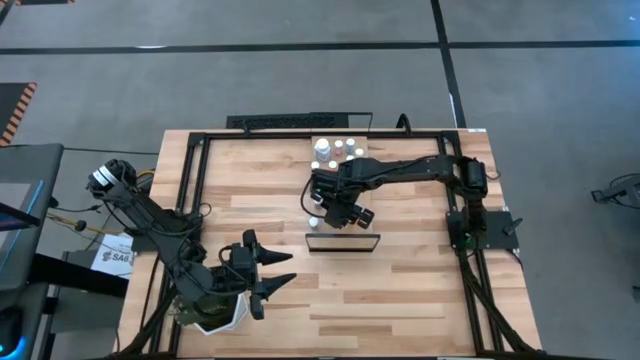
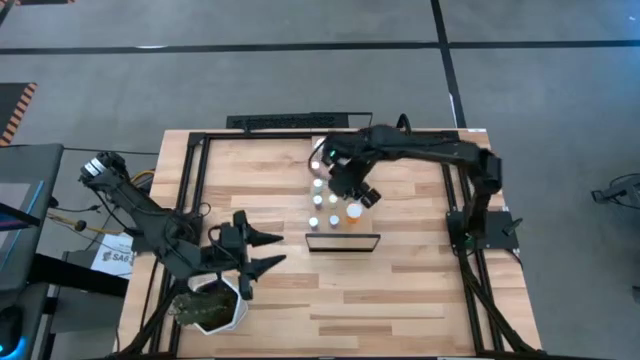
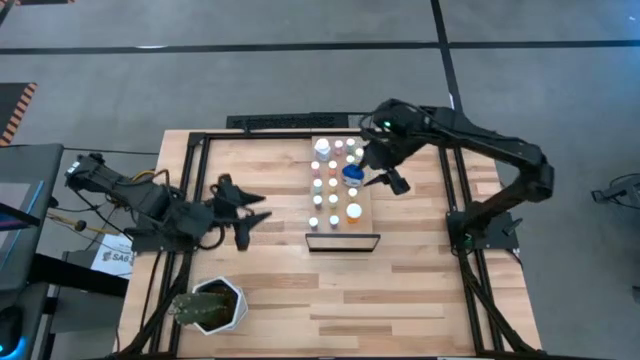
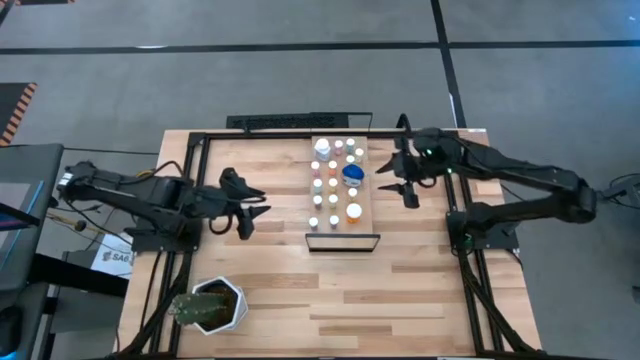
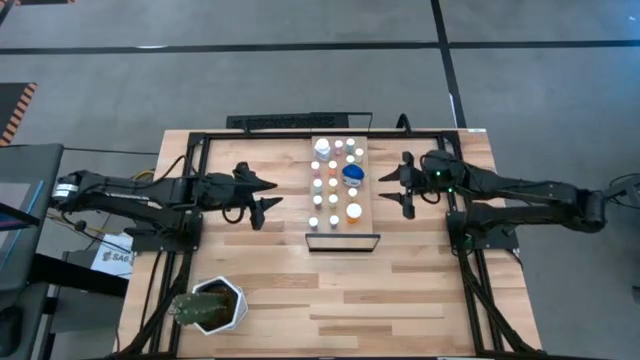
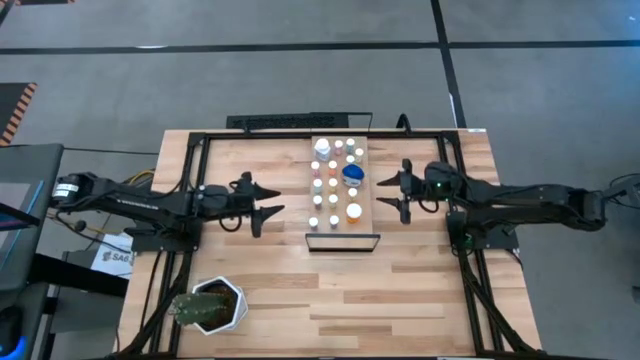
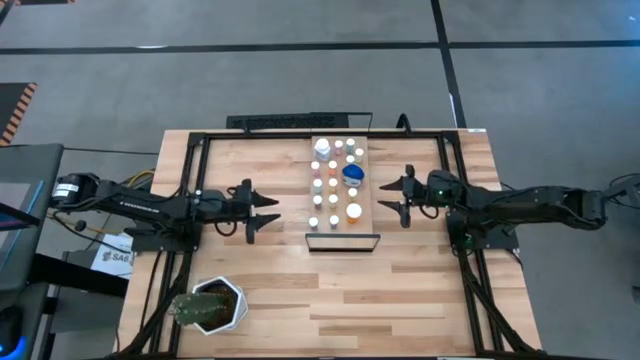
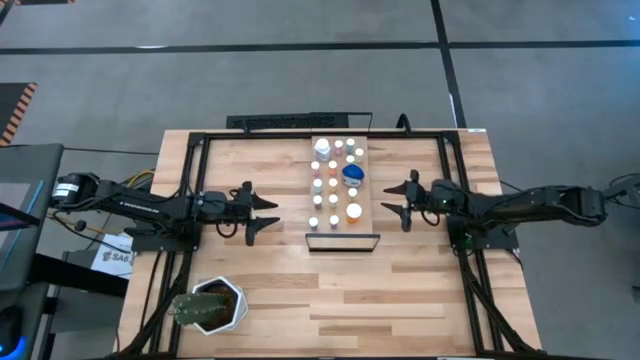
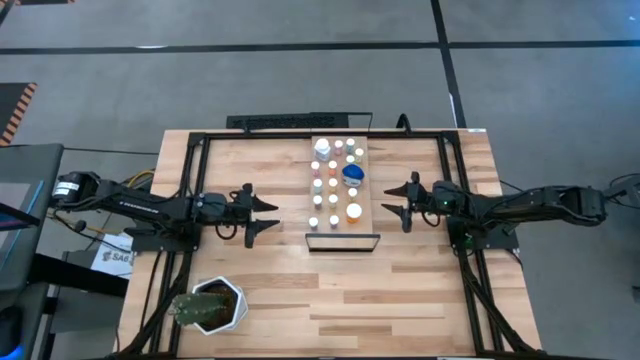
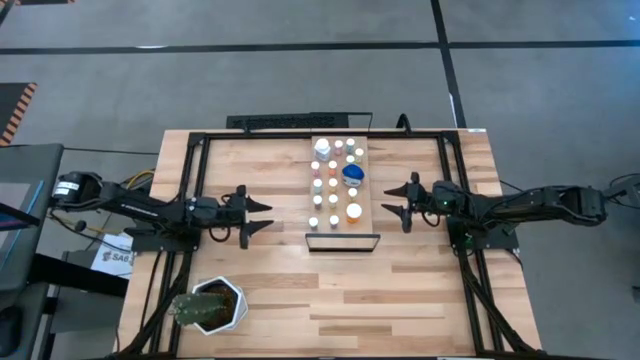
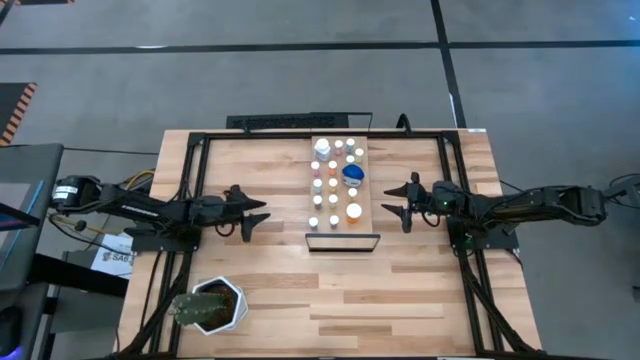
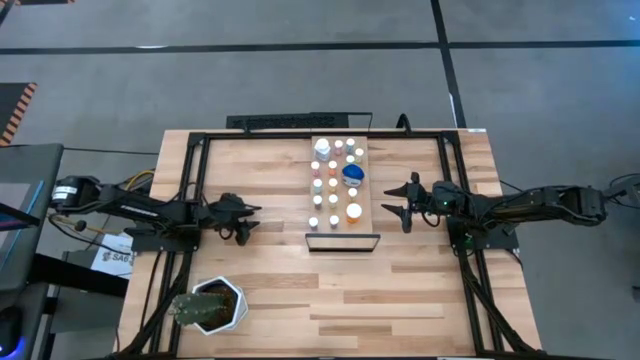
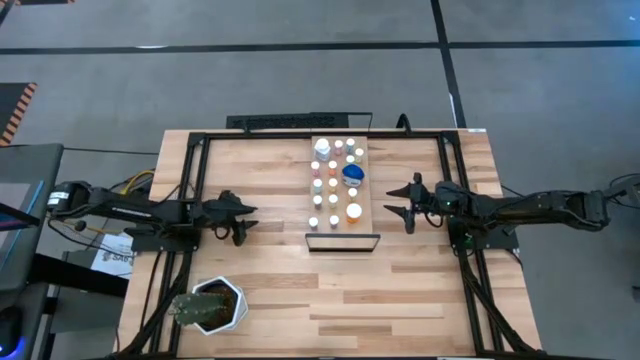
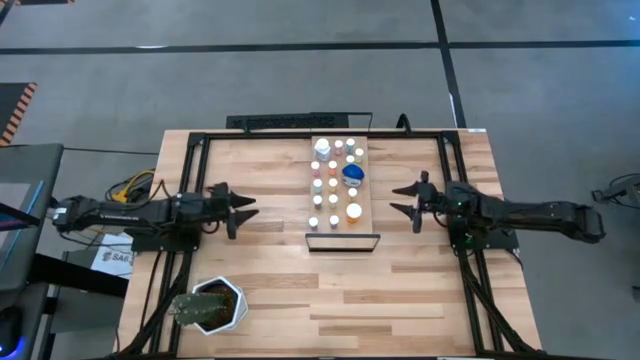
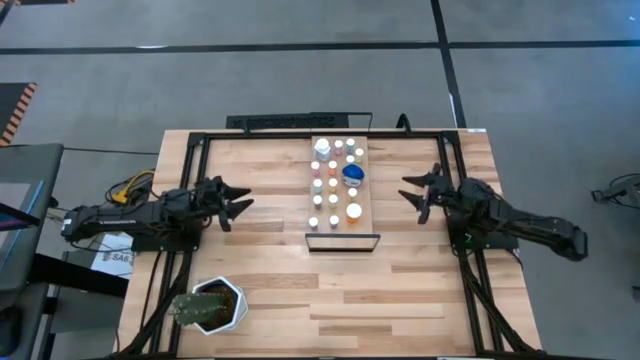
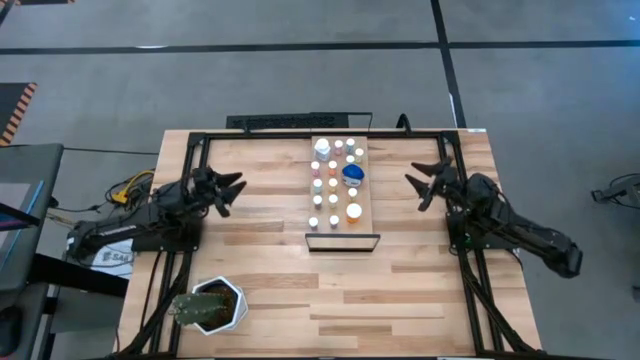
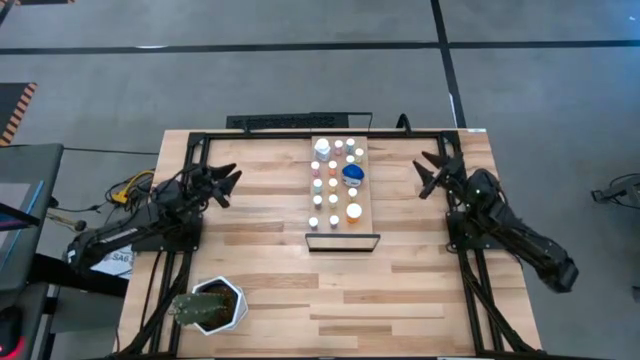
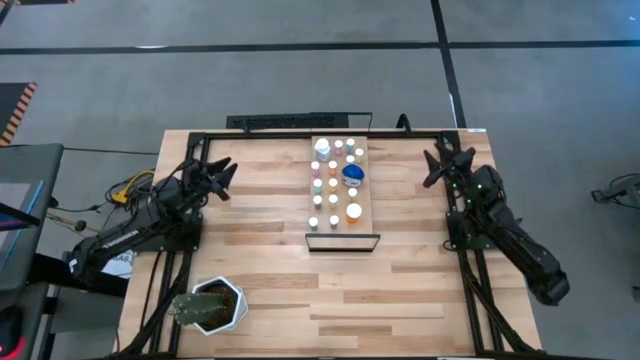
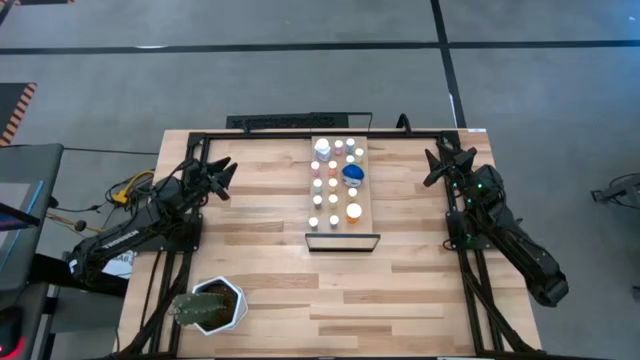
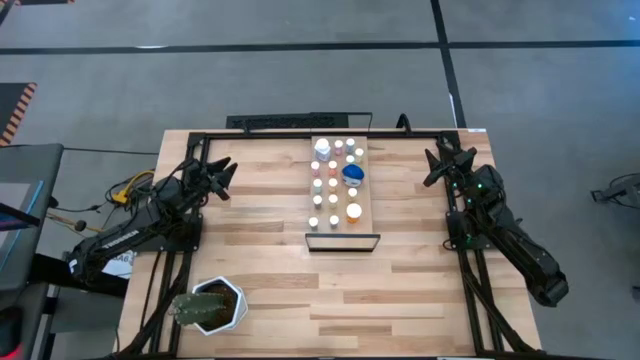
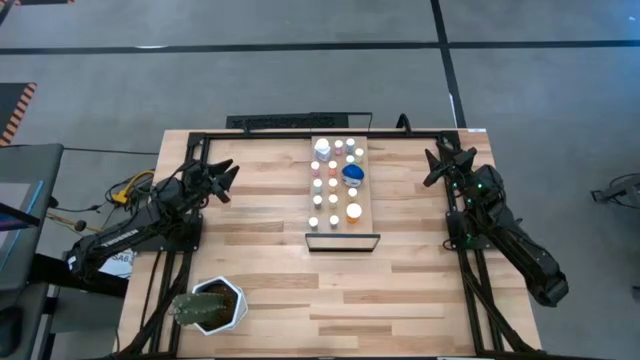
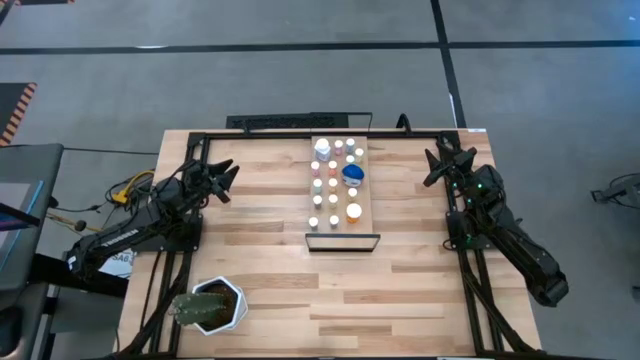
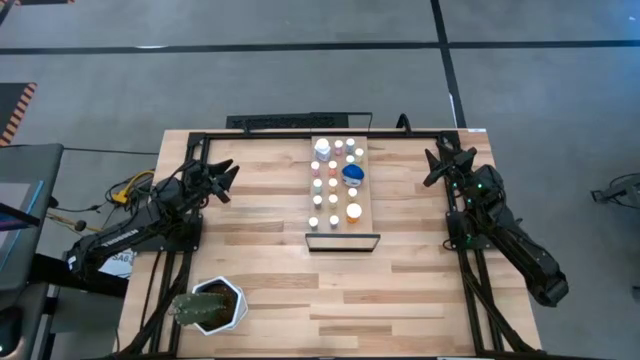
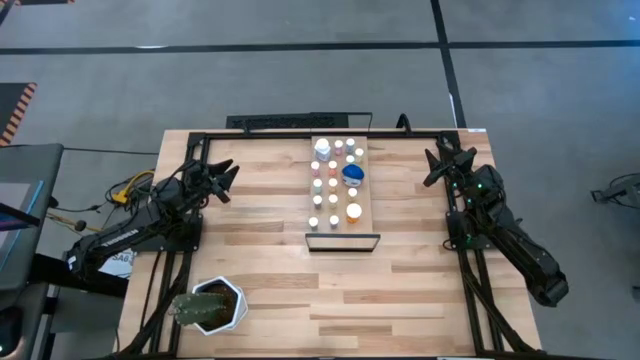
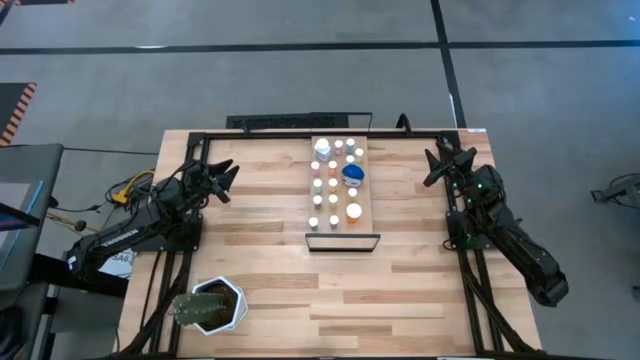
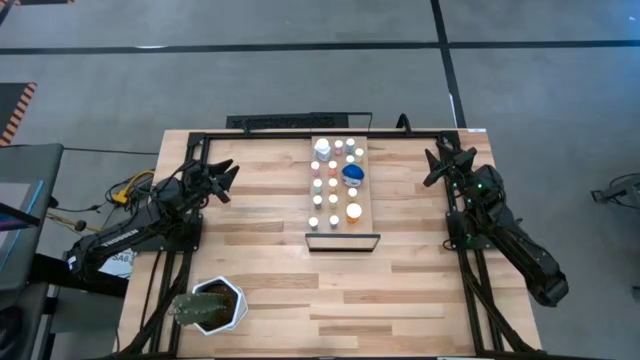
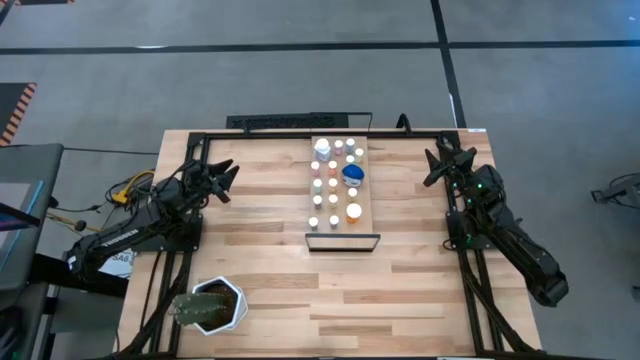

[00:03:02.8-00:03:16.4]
Task: Pick and place medicine bottles onto shelf by color
Return to Home Position

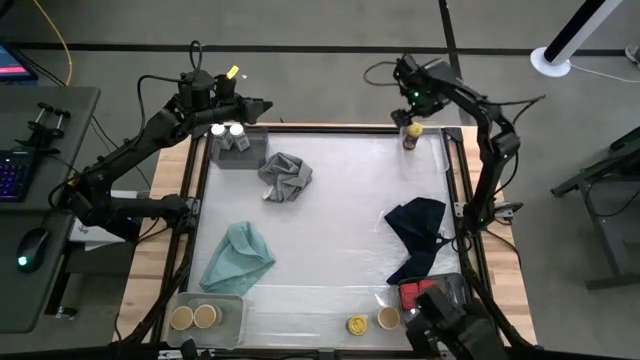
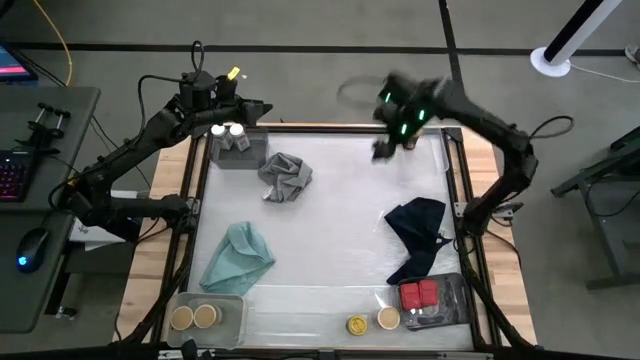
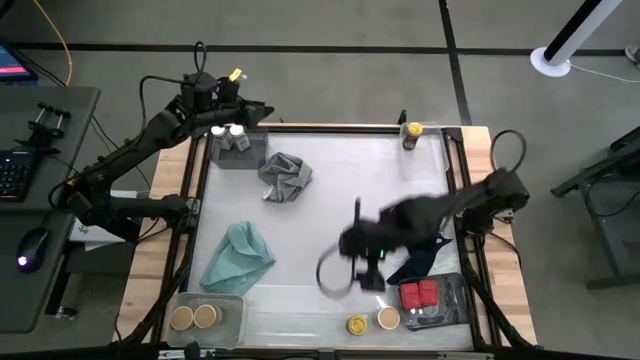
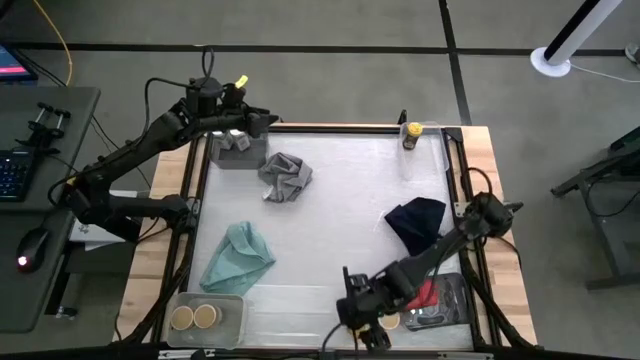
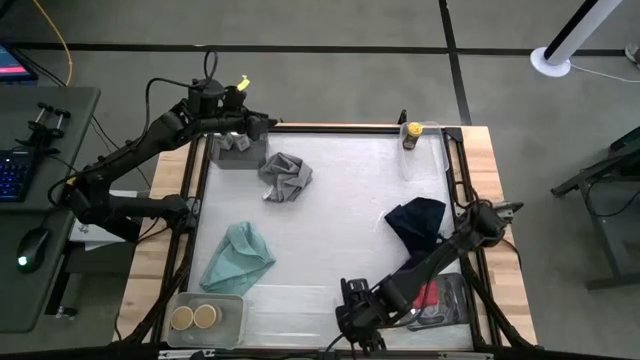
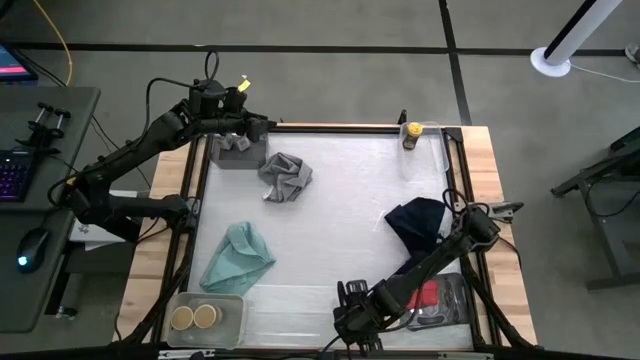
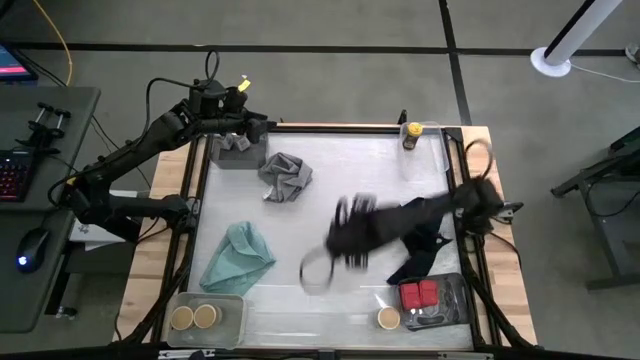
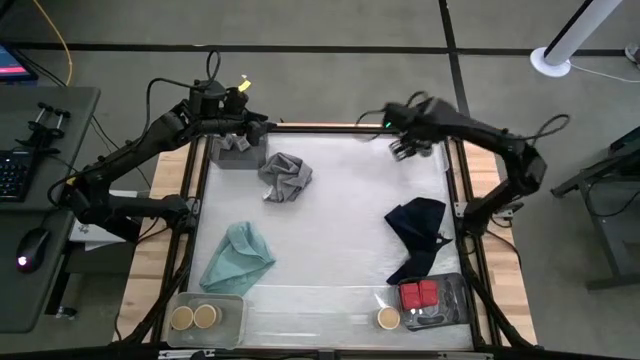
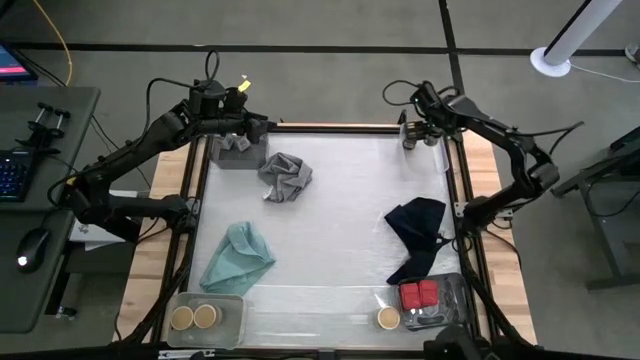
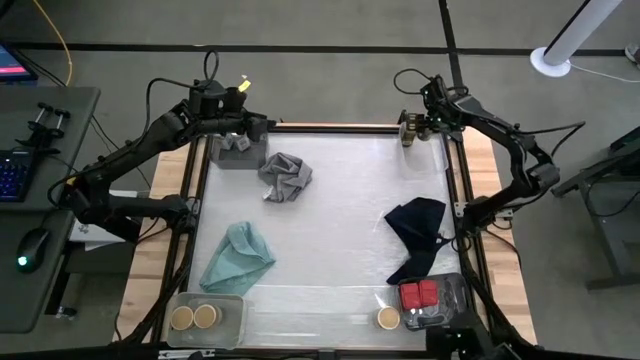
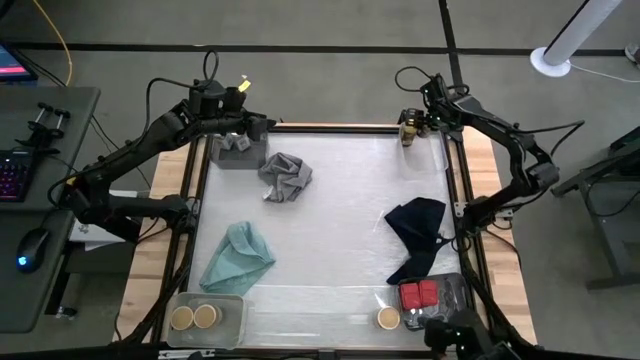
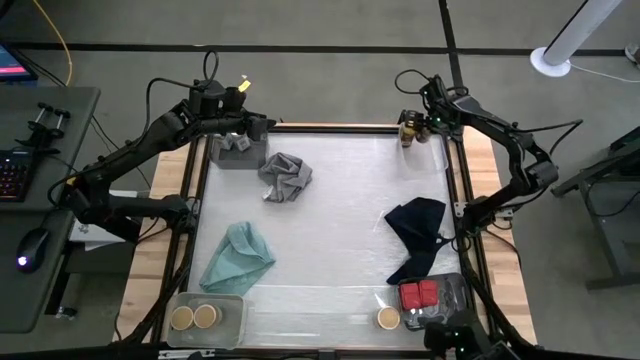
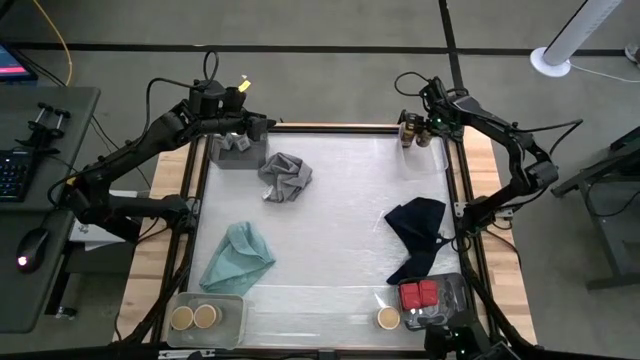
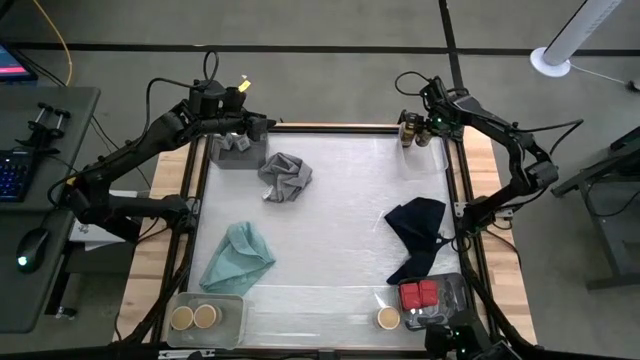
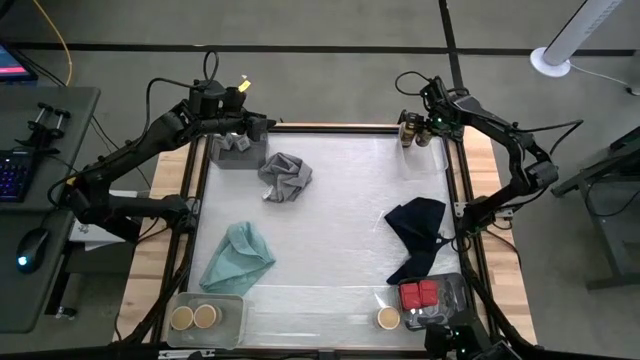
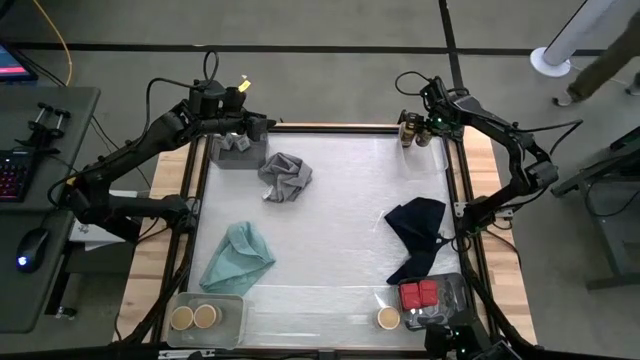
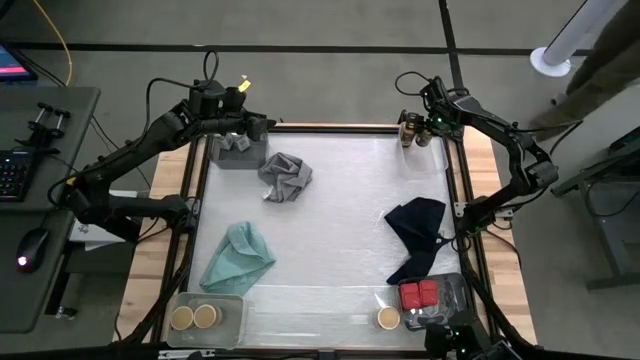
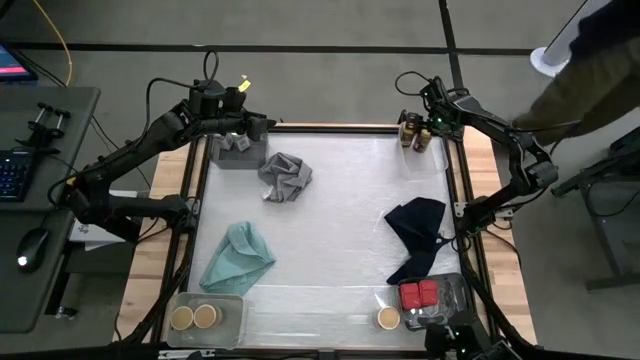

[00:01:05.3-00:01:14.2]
Task: Sort spices by type
Put the yellow seasoning bottle into the transparent bin
